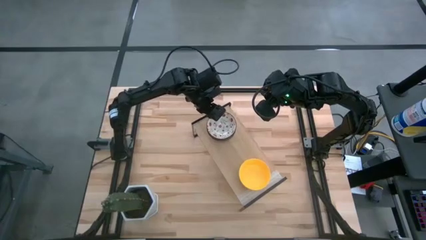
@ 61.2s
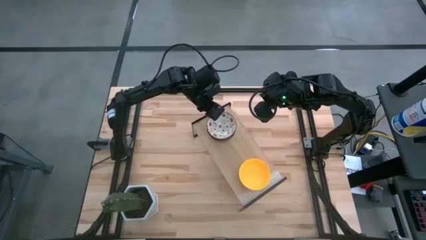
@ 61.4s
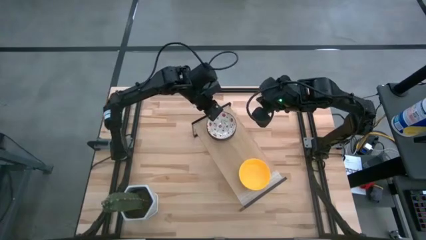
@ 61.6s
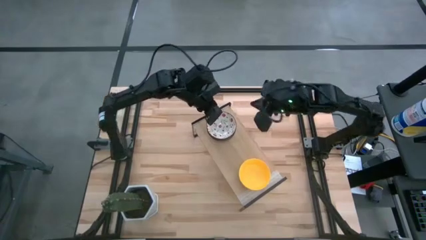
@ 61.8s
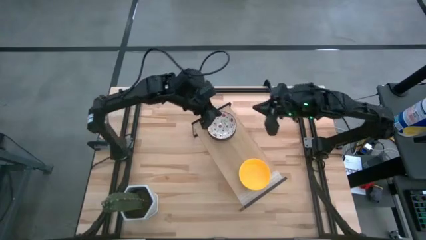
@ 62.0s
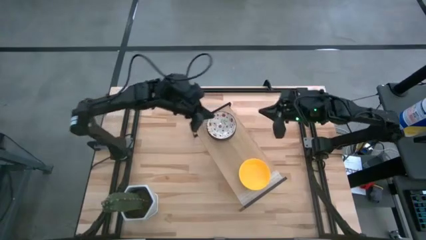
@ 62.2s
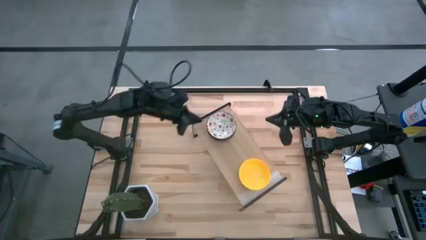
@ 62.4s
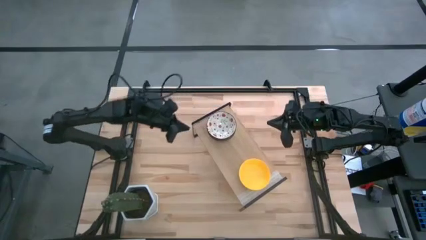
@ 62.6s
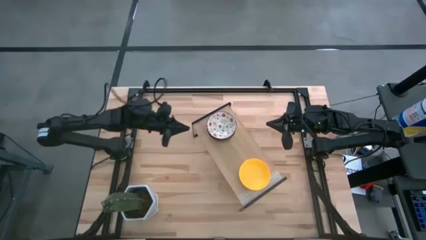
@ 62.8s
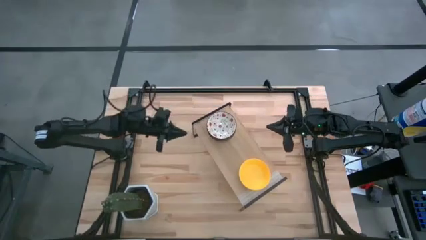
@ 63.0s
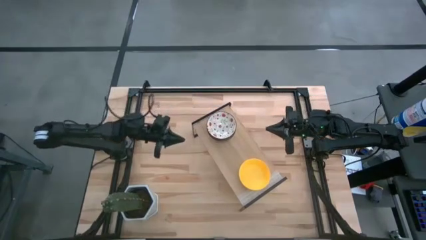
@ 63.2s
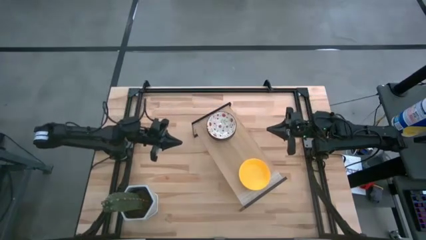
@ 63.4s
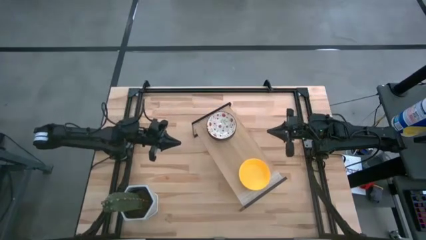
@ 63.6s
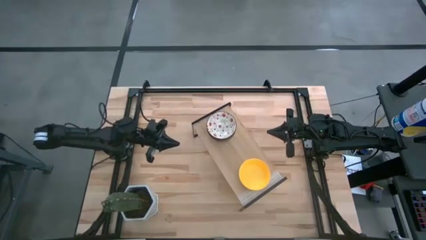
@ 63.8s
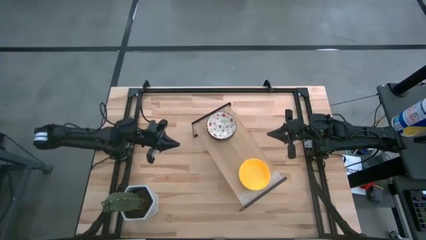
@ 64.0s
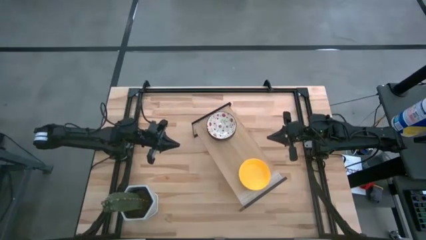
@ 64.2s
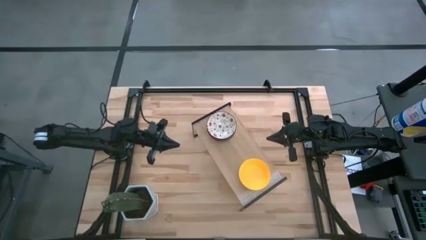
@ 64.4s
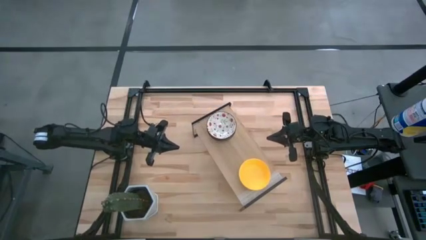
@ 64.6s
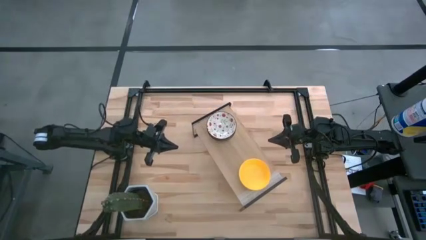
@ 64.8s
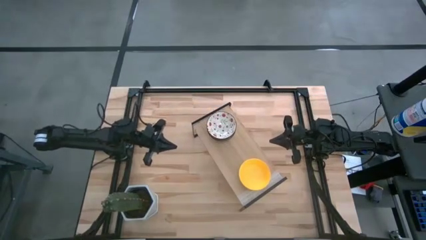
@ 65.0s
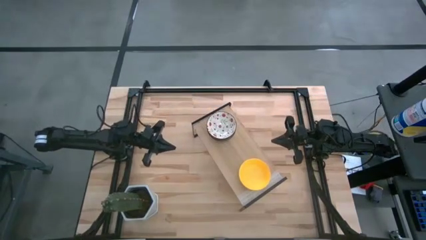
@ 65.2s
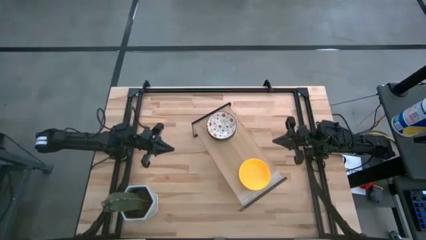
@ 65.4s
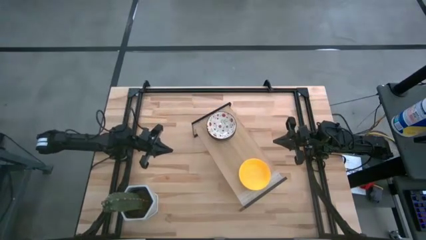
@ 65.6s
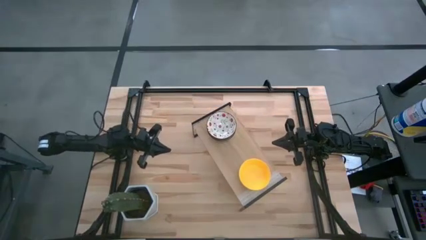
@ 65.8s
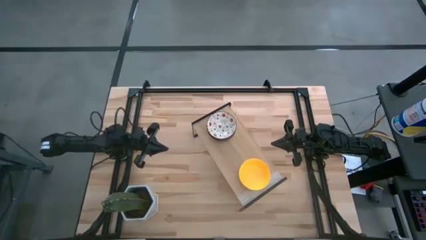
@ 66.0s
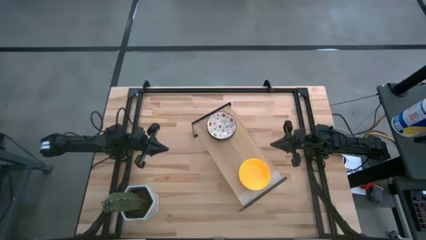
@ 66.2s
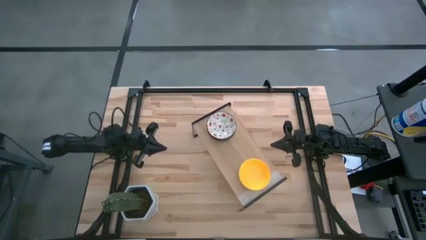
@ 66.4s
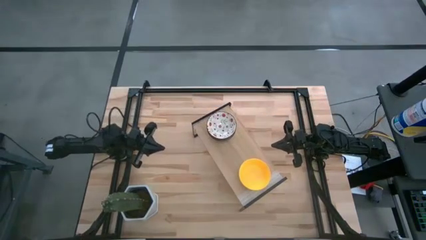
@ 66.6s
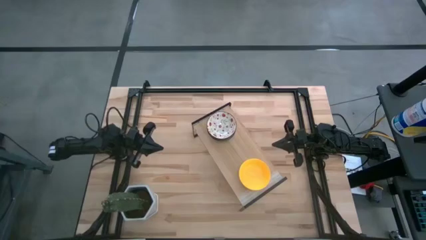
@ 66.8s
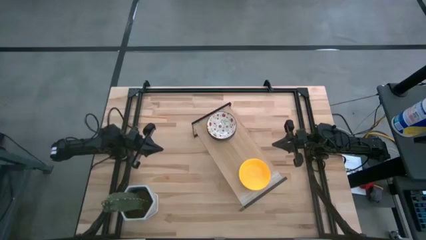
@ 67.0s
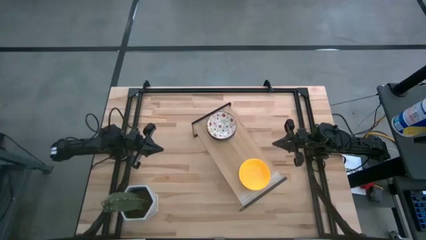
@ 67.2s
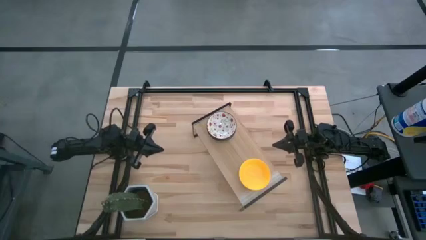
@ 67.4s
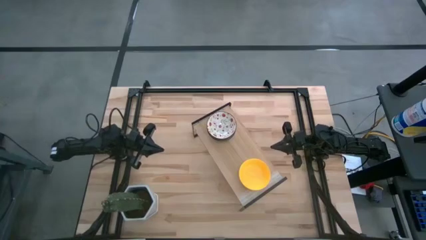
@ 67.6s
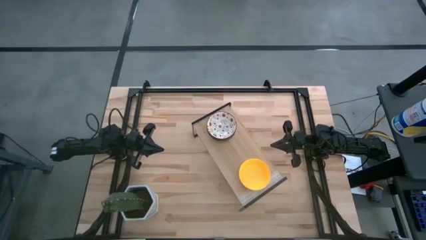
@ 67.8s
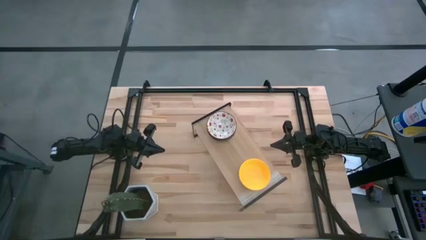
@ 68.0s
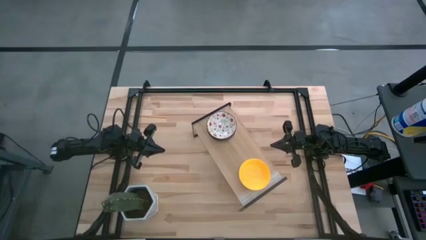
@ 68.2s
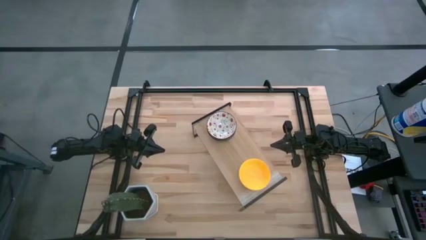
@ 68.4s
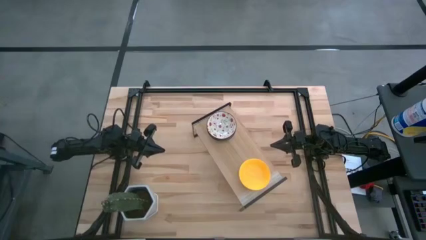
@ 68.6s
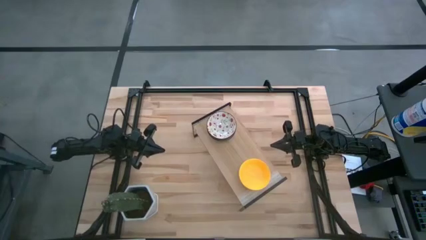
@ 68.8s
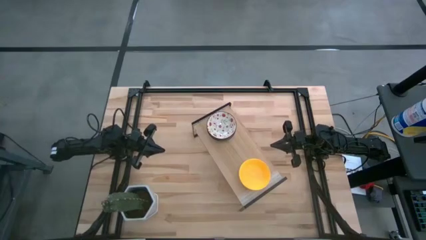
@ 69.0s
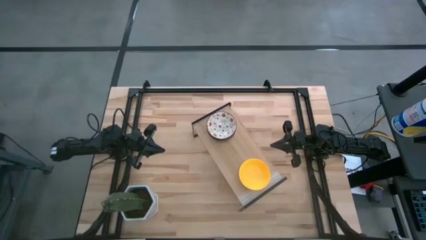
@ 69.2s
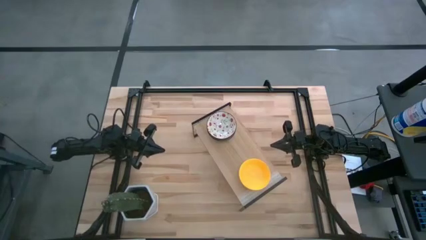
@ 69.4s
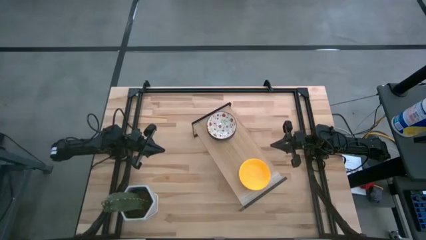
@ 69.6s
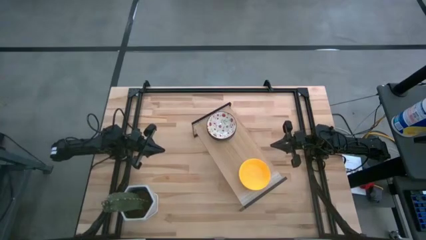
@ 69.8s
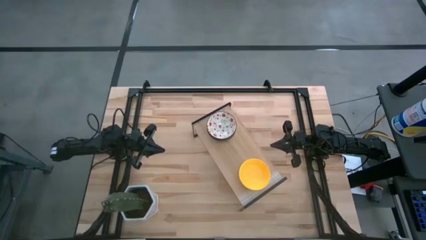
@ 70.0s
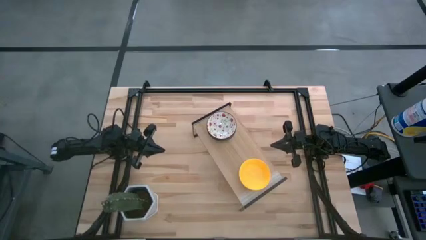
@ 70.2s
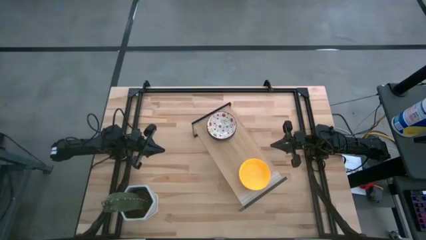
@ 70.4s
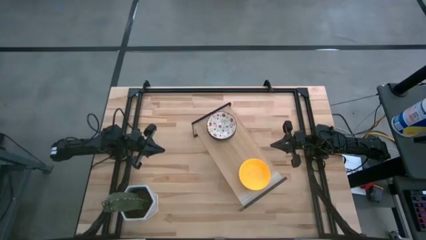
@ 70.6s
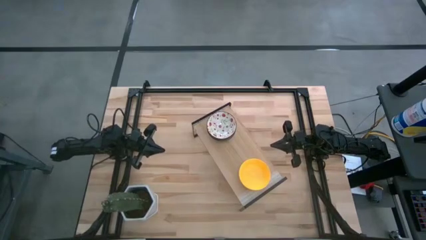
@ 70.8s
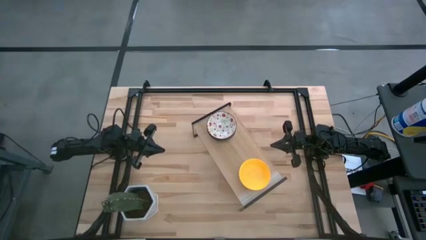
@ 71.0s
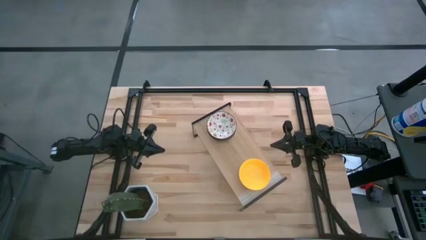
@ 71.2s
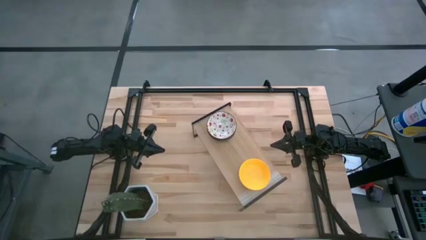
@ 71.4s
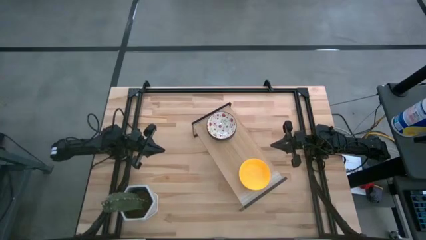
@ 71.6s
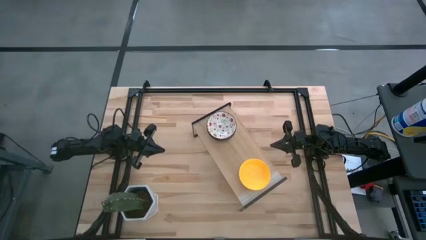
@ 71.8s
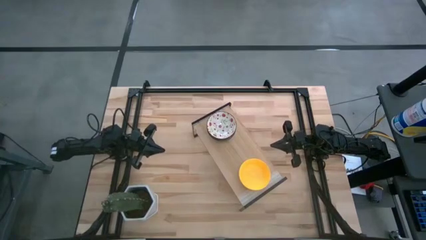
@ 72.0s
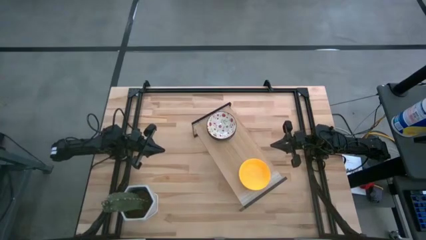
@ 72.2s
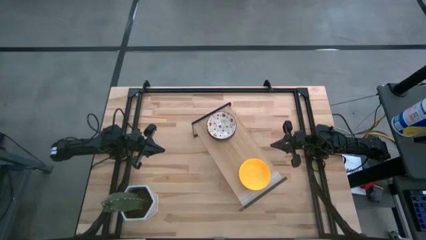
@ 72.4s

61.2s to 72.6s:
Task: Pick & Place Mini bowls
Return to Home Position

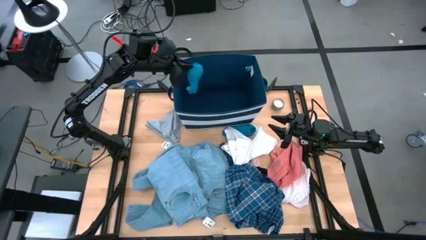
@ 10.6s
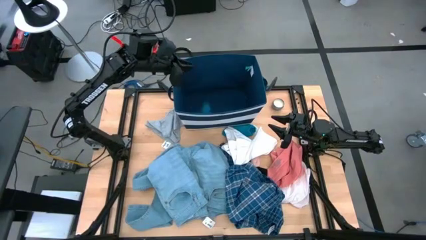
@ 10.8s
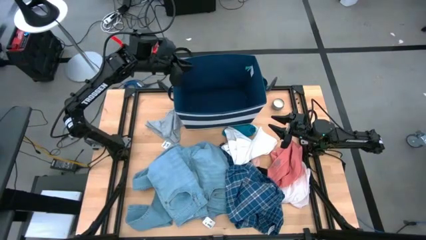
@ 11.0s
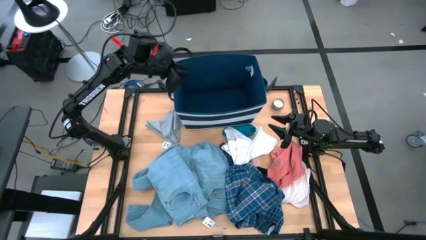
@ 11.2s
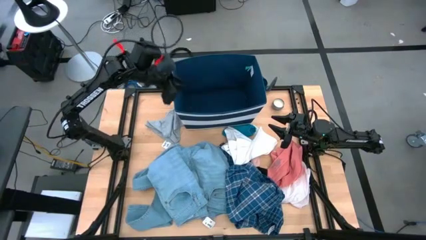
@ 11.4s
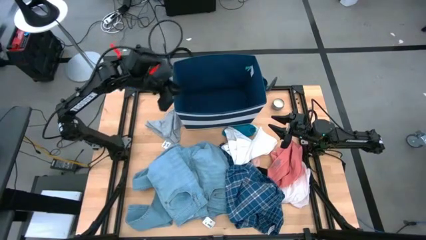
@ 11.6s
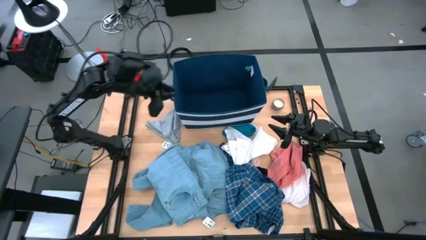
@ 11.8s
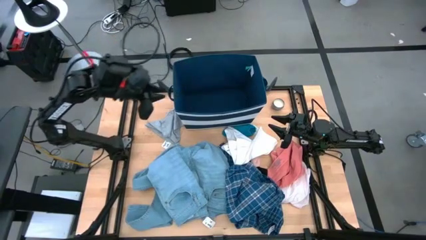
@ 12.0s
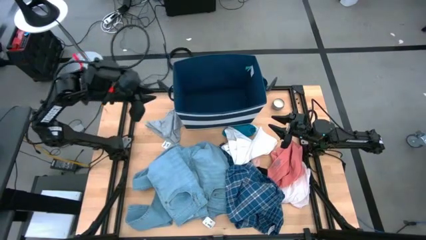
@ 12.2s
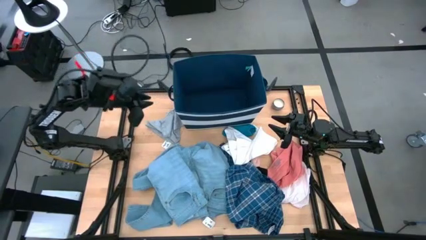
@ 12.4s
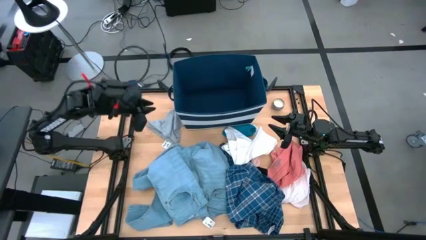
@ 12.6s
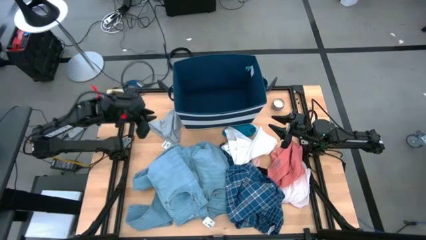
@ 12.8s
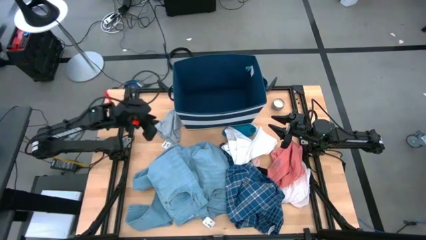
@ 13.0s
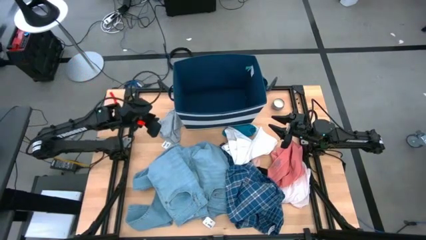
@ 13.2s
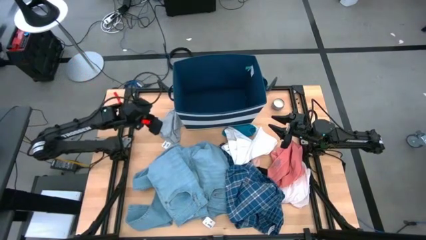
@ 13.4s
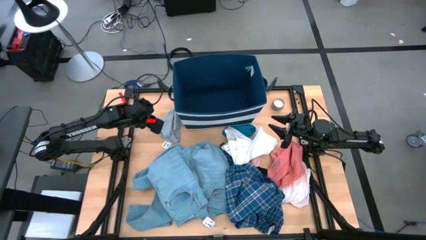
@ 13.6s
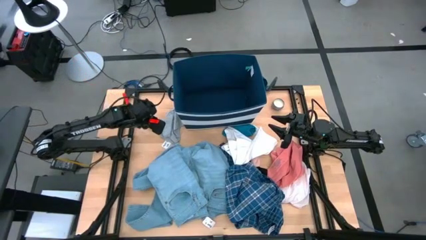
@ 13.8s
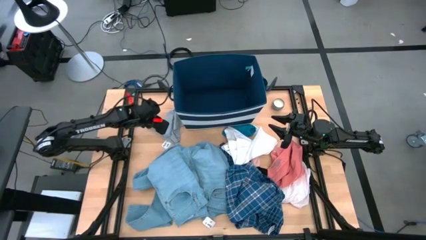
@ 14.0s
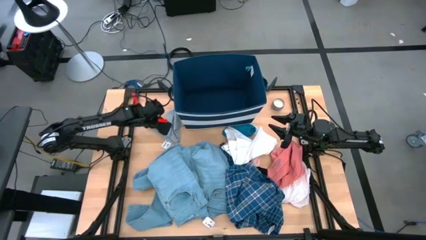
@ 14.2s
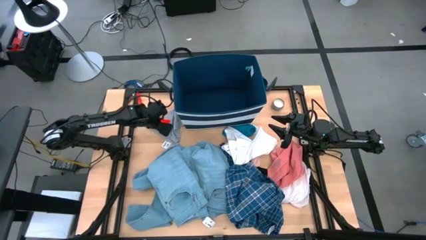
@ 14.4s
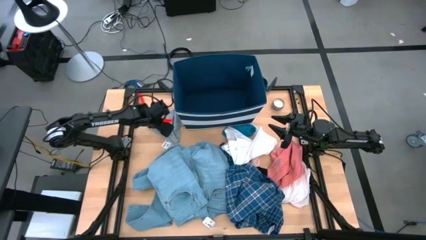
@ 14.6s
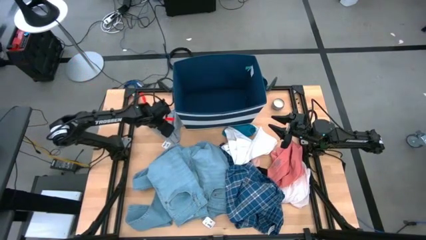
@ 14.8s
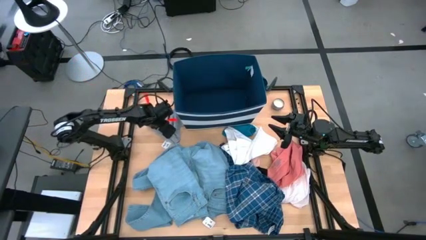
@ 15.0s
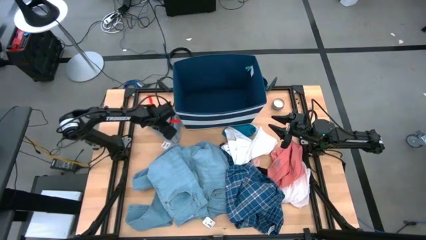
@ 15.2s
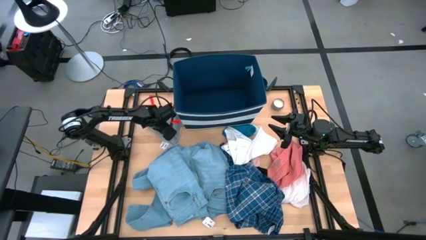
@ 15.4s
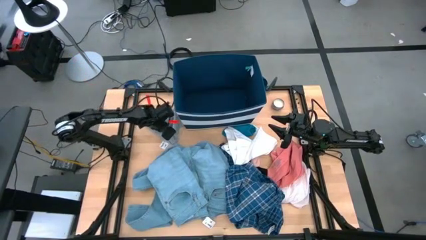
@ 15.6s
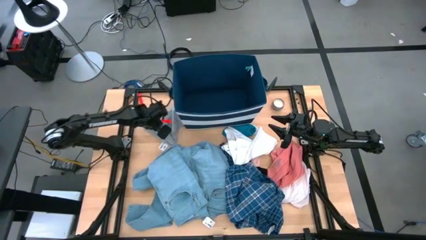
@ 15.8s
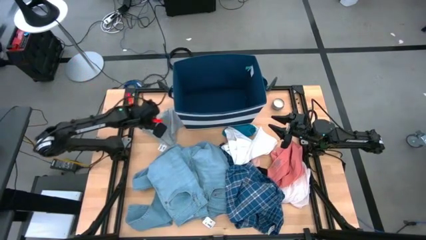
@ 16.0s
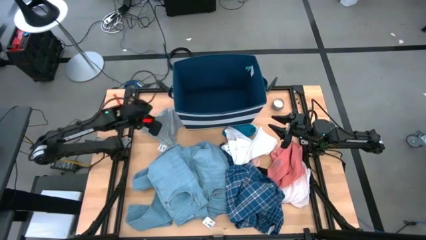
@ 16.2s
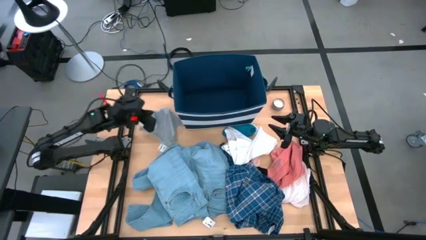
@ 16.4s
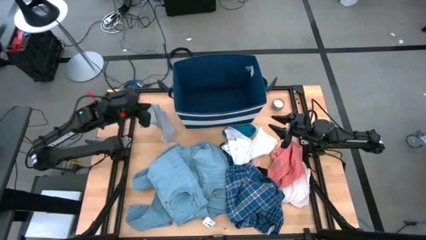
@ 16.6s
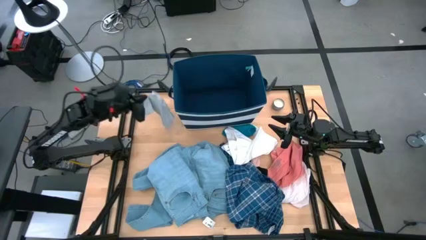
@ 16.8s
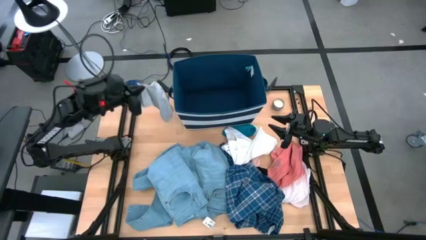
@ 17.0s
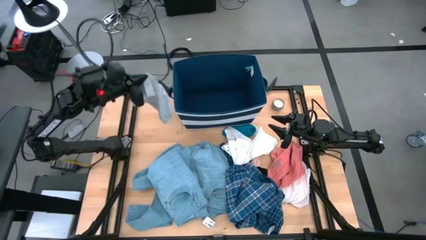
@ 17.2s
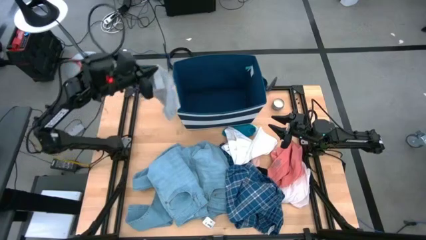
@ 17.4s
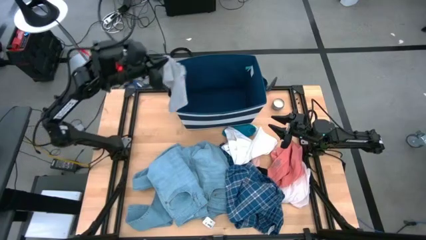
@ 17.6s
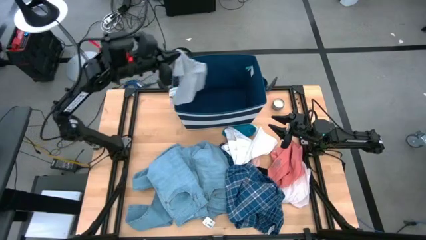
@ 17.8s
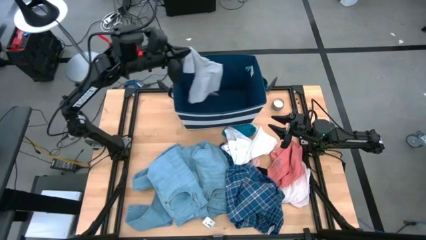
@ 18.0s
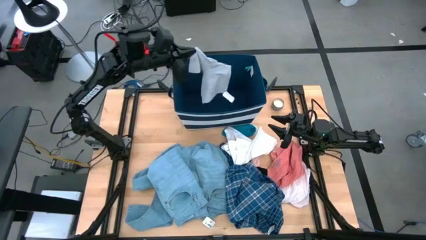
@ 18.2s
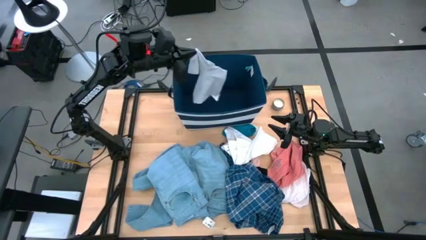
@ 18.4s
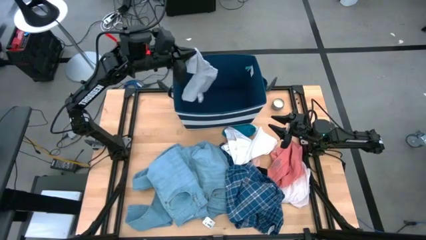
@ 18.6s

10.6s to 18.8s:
Task: Sort clothes
Put the gray underwear into the blue organizer bin
